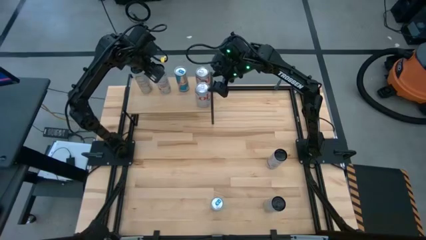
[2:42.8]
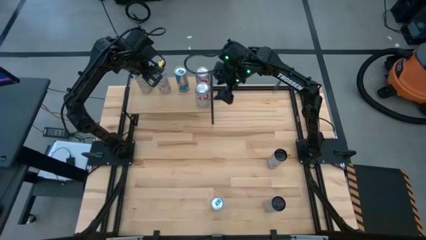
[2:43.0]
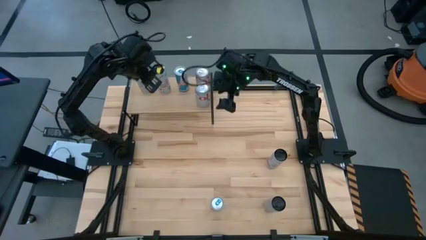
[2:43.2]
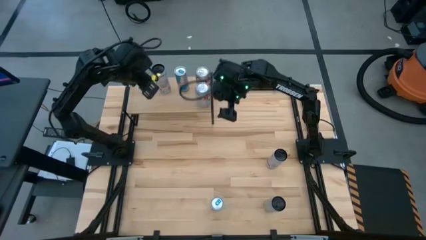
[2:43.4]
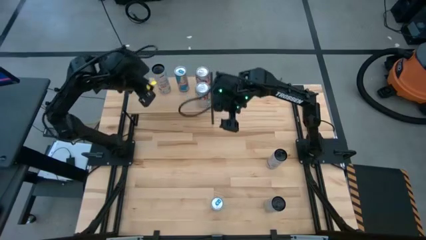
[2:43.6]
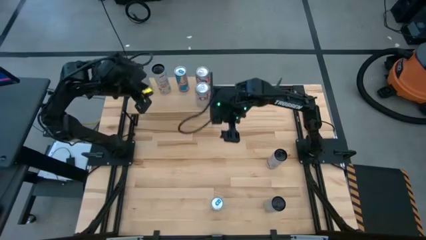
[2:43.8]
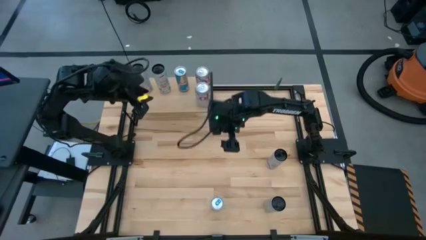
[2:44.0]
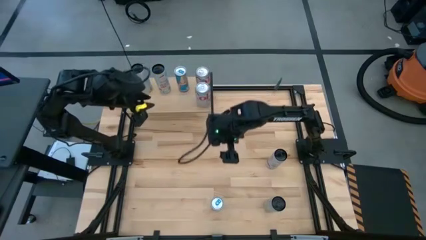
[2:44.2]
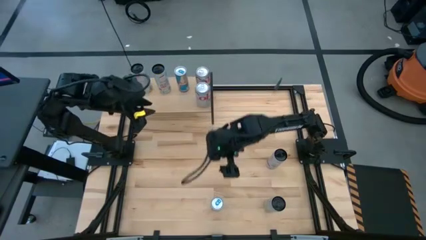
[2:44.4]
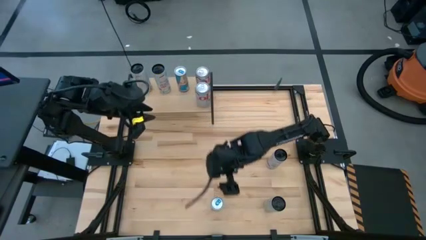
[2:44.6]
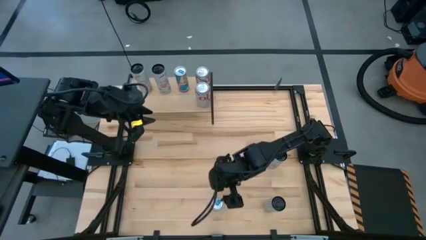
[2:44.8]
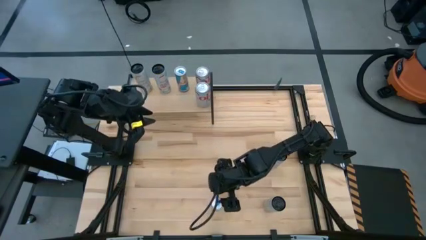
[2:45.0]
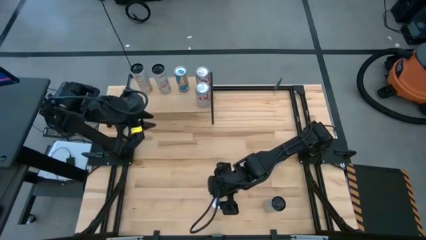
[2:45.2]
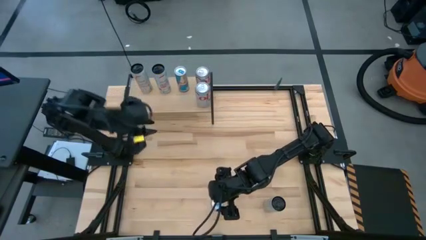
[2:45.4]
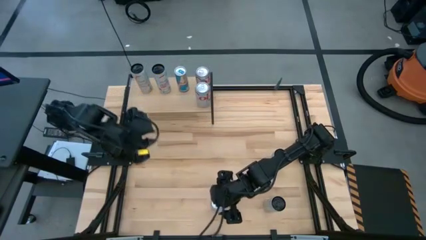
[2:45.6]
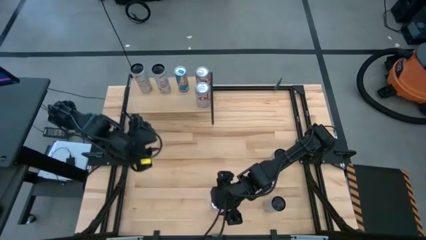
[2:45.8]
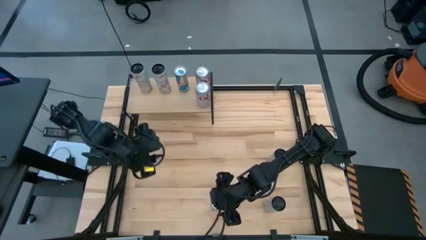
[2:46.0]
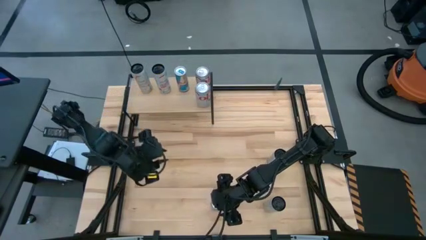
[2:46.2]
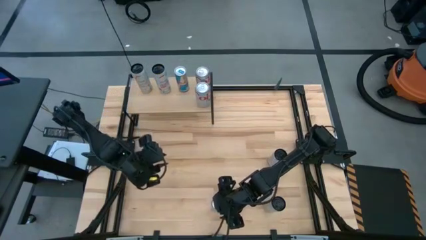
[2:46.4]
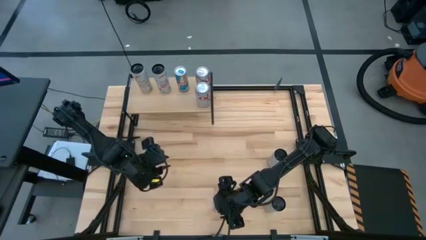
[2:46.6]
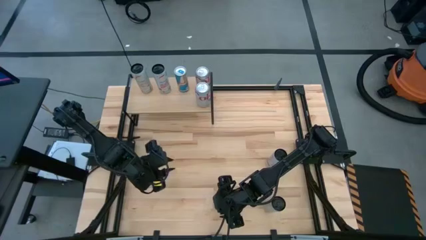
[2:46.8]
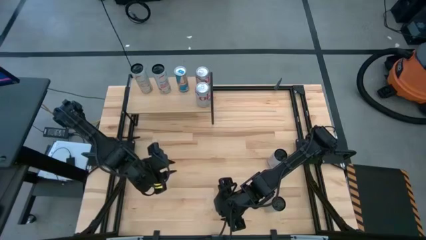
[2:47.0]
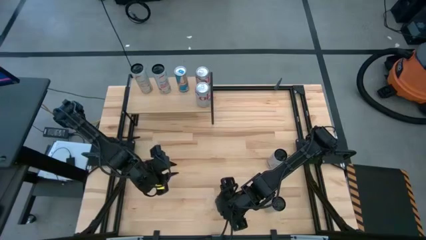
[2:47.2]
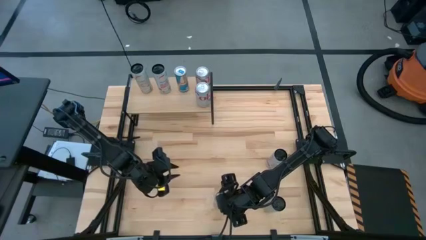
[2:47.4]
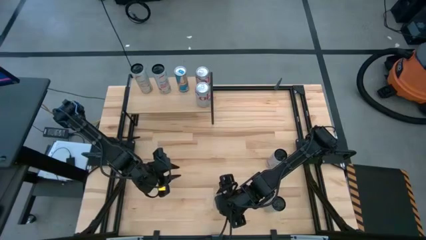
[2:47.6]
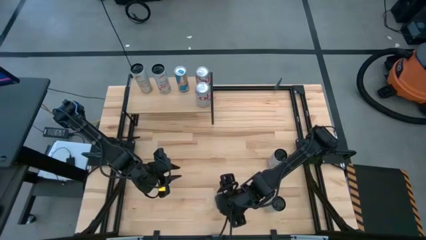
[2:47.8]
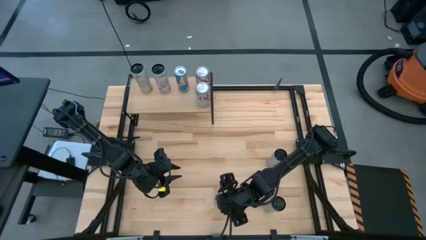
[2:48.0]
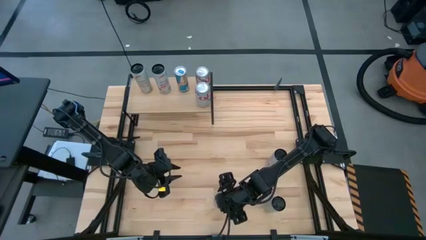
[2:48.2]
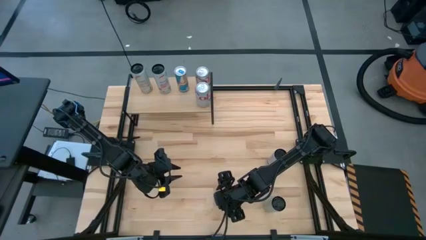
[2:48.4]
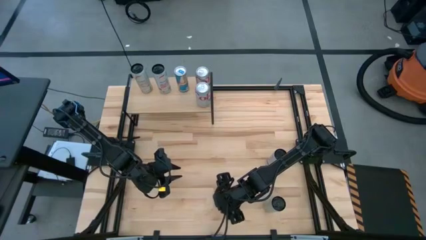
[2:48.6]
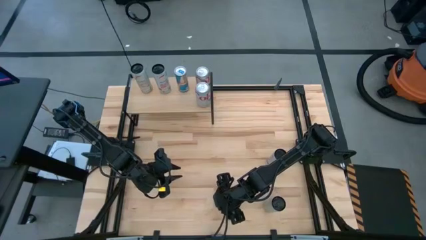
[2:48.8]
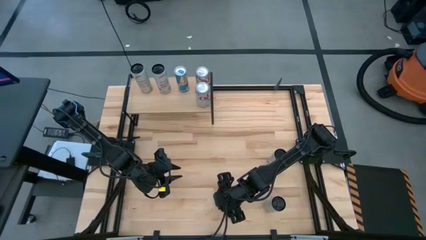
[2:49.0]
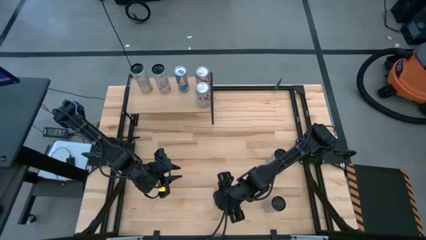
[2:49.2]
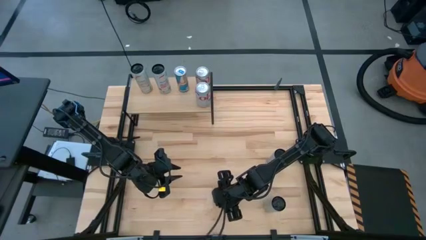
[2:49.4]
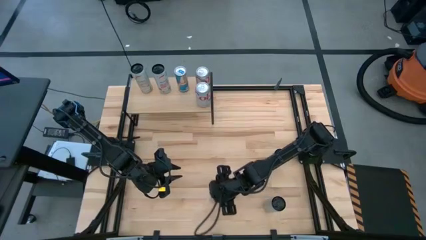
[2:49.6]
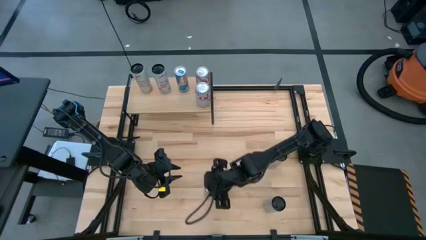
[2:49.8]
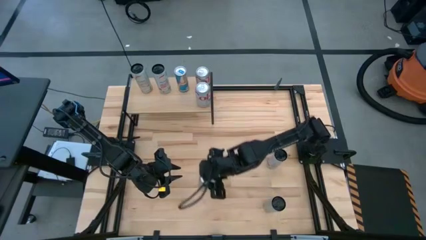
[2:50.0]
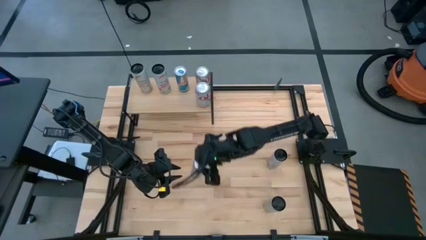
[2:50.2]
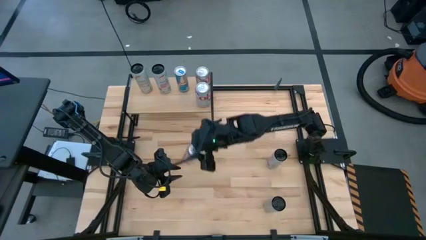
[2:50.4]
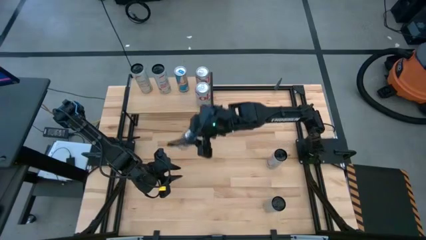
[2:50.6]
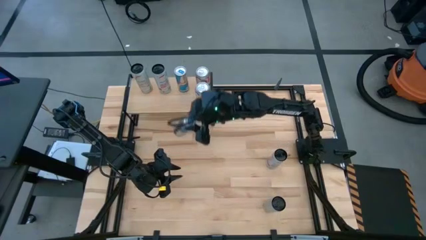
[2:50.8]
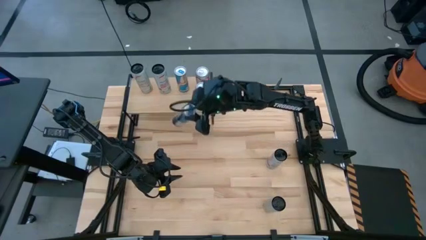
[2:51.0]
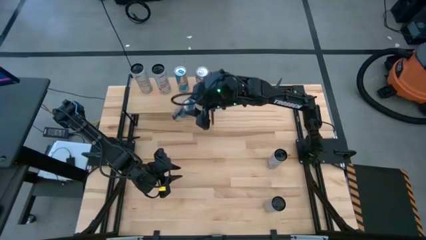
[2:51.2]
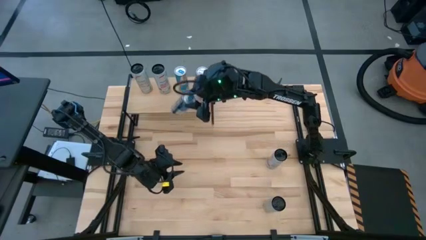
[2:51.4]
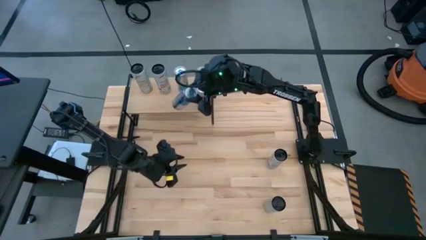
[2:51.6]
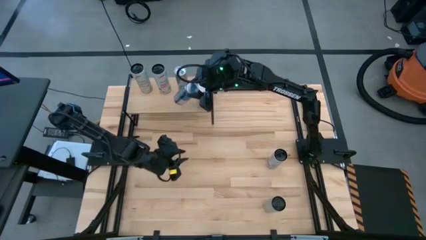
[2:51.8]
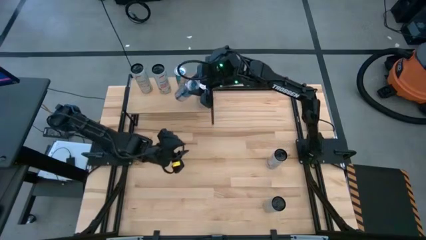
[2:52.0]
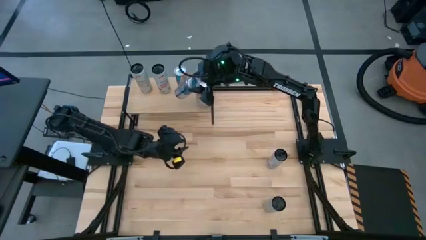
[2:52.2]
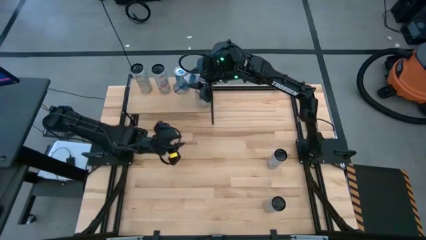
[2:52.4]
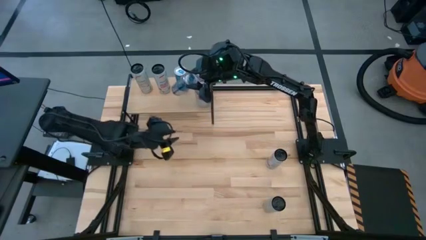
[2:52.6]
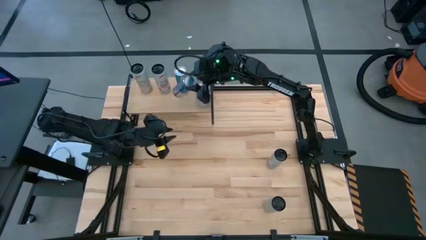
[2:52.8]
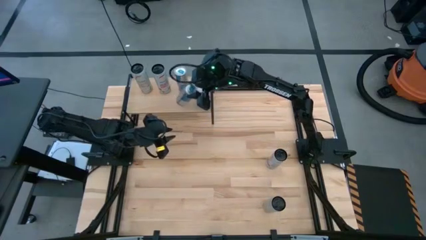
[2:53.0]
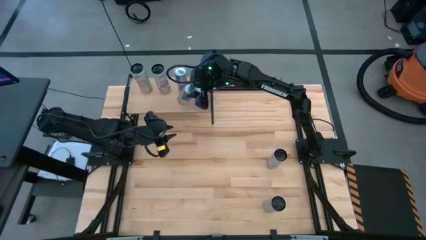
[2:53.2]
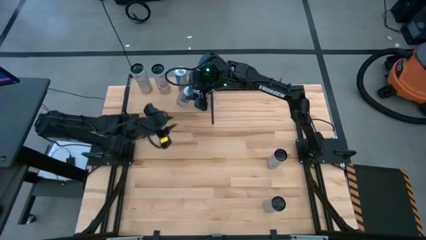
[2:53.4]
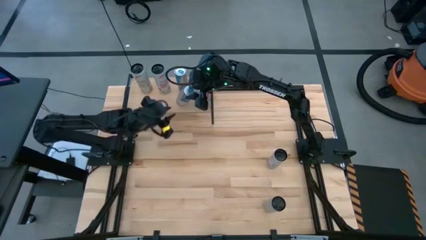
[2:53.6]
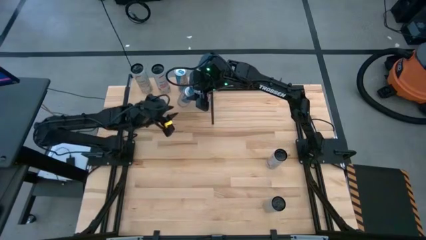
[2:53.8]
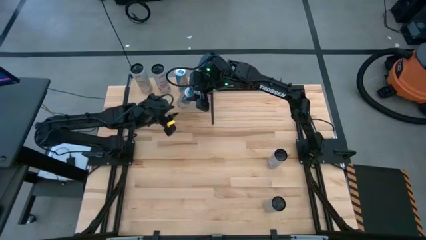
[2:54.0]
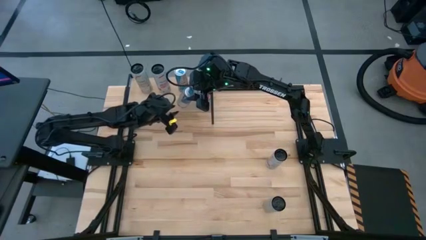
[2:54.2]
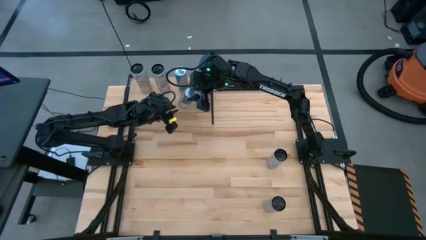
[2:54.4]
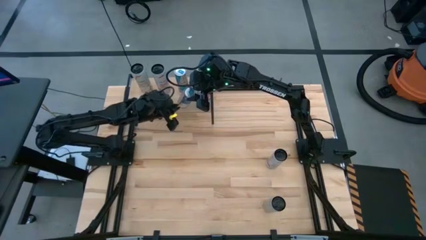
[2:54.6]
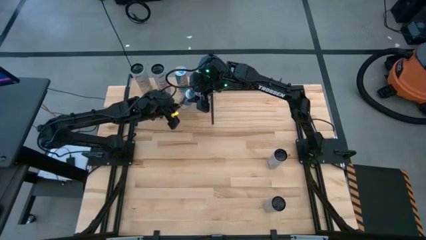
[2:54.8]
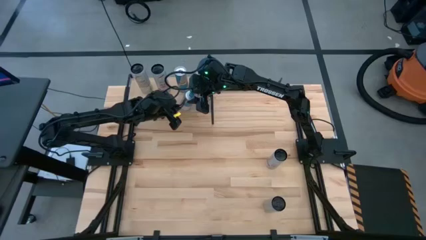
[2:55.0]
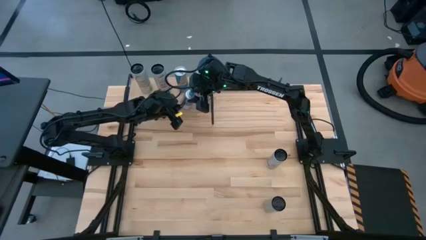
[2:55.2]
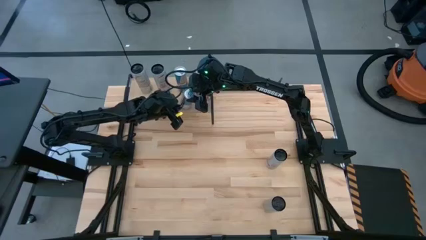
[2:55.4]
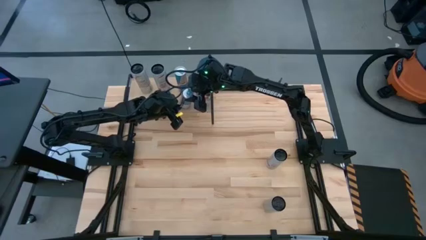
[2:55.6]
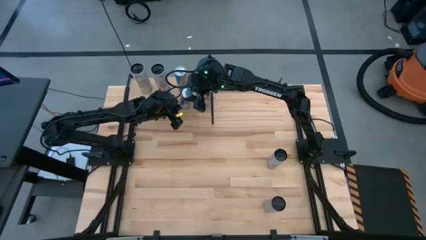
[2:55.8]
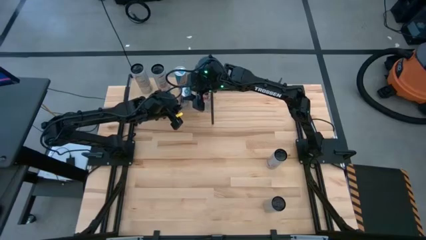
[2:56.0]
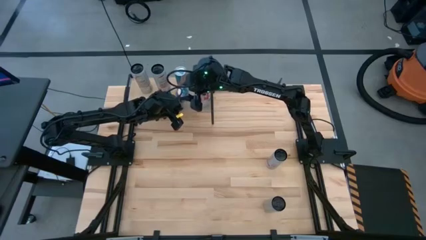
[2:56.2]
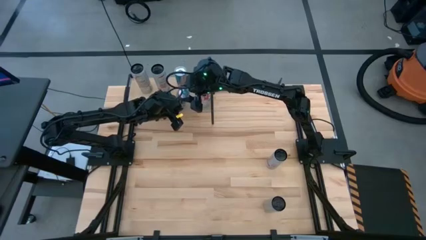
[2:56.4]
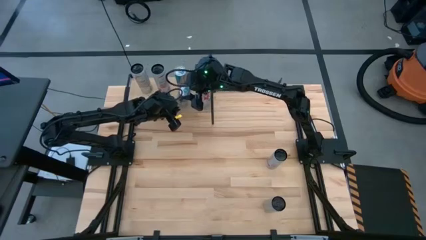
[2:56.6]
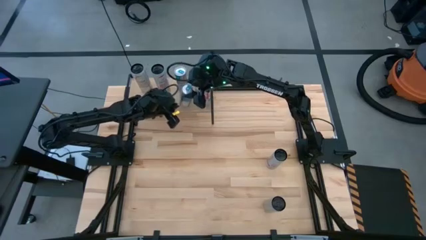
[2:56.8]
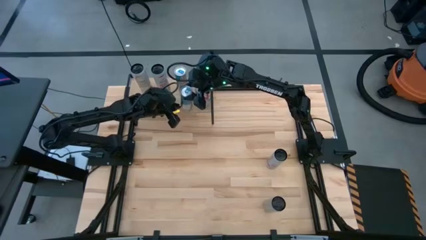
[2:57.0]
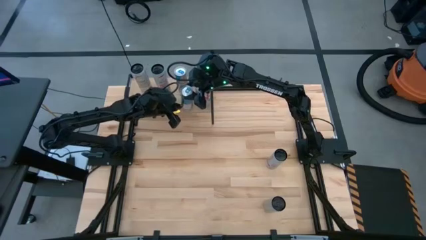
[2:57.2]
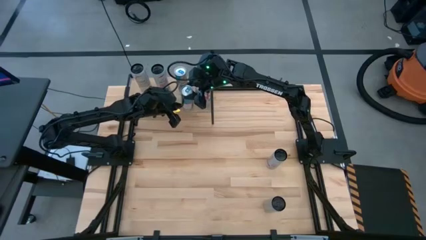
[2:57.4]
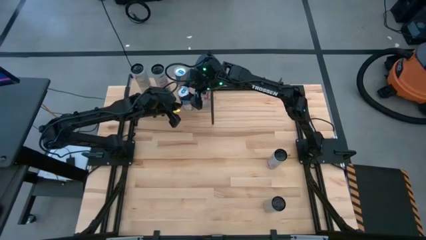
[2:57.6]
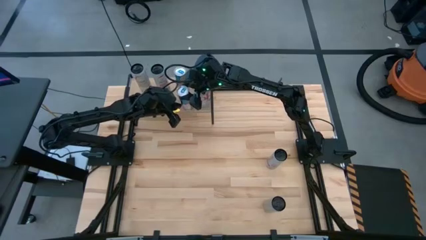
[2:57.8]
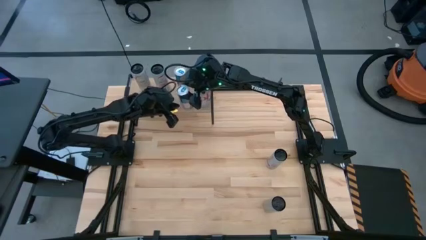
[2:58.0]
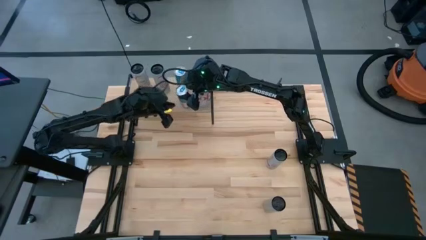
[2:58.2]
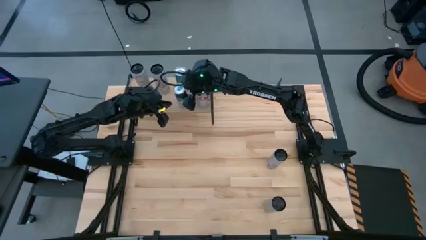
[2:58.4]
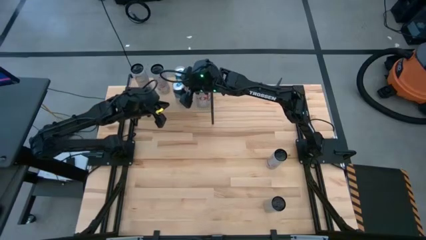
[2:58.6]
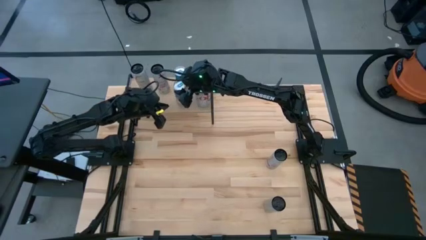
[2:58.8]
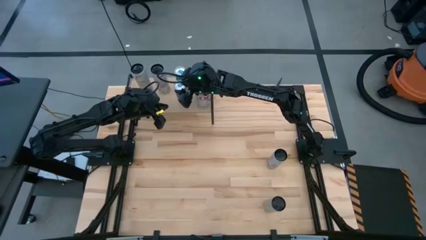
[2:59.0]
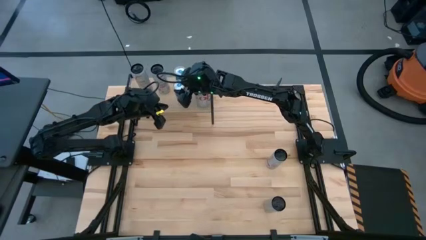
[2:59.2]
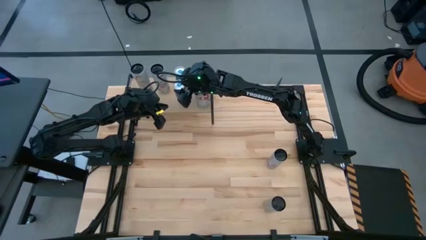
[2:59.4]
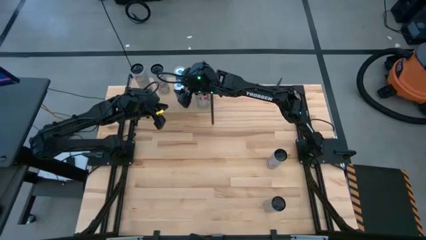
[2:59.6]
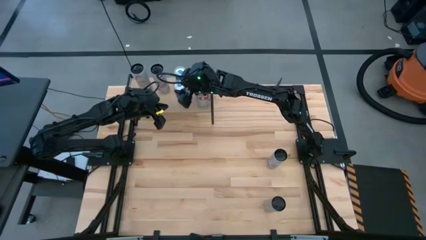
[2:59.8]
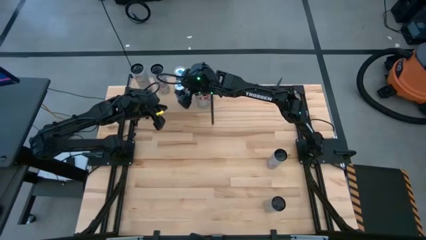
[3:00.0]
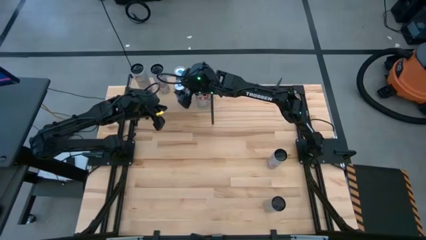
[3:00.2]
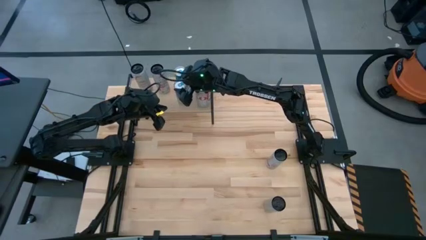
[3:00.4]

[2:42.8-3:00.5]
Task: Place canned beverage on shelf
Put the blue soda can on the shelf aligned with the other blue can
